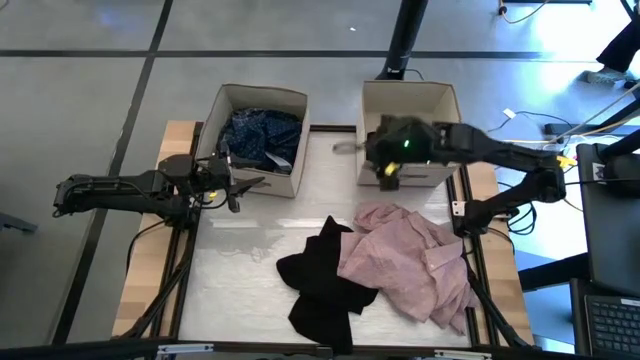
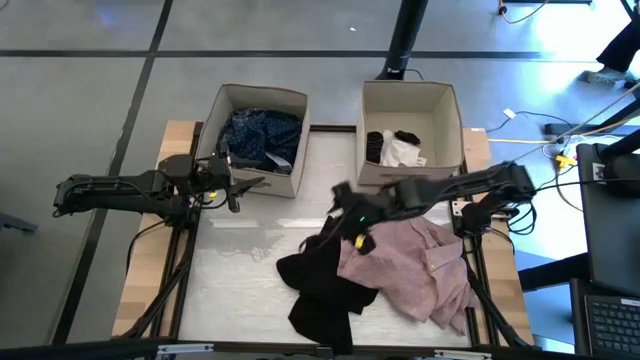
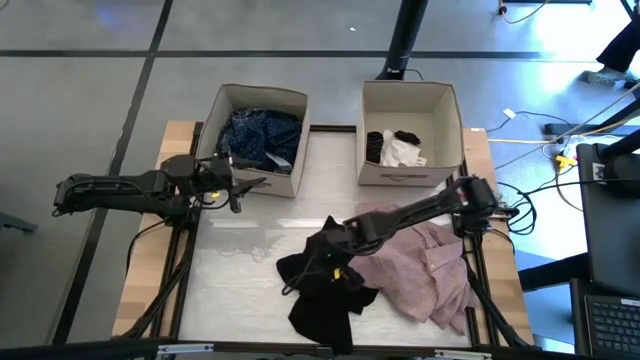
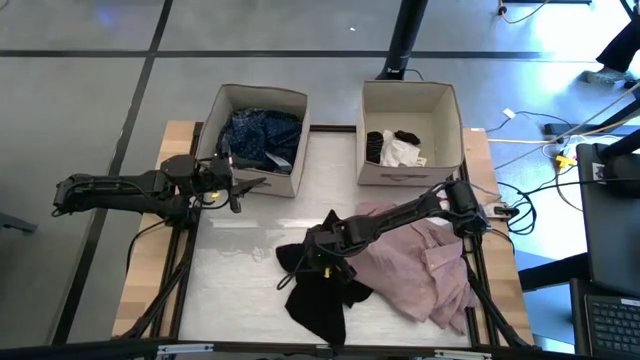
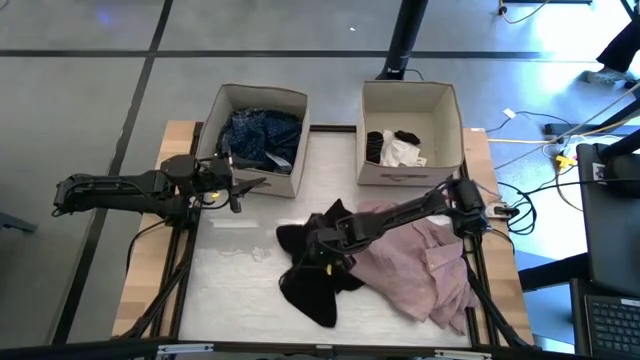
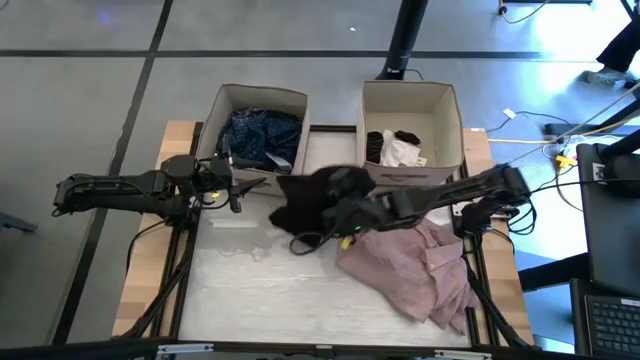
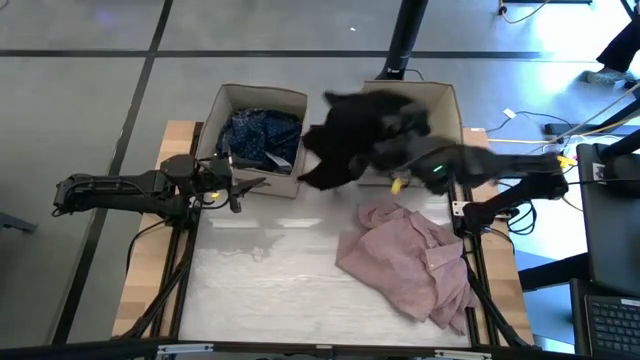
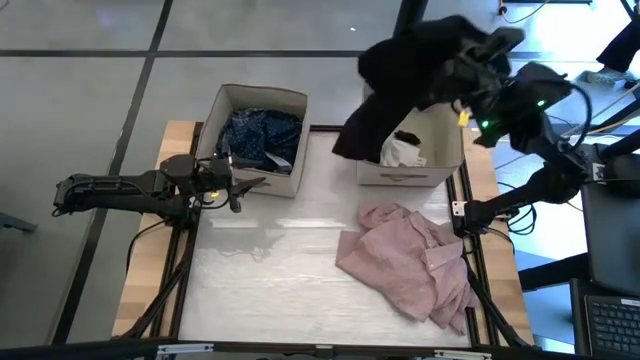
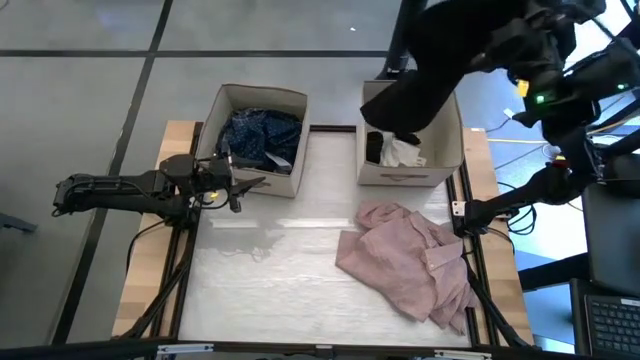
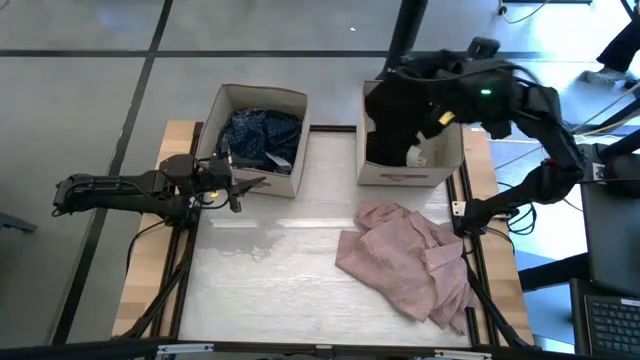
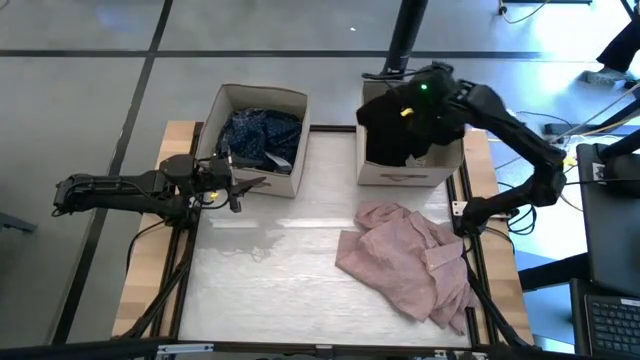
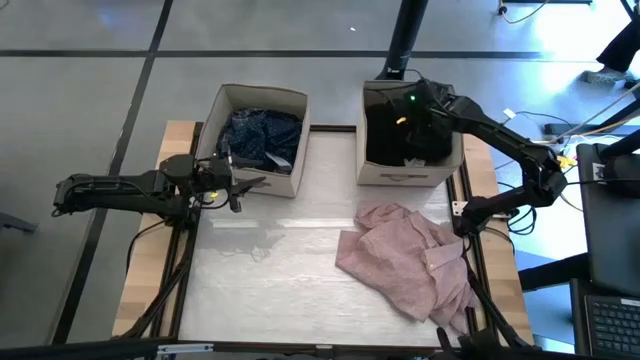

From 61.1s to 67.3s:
Task: Sort clothes
Put the black shirt into the right laundry organizer

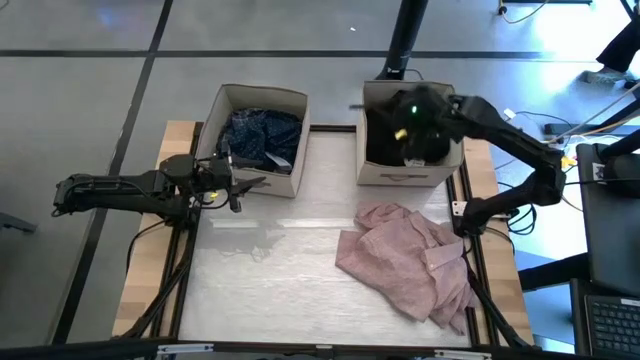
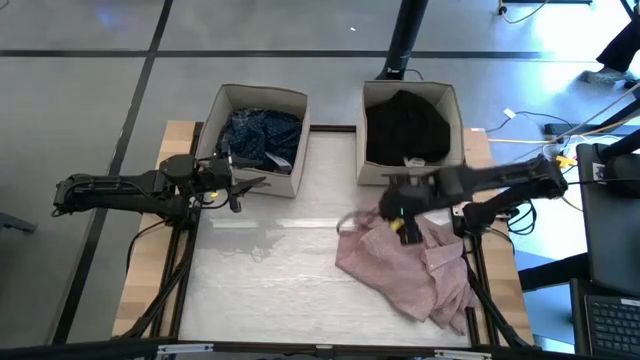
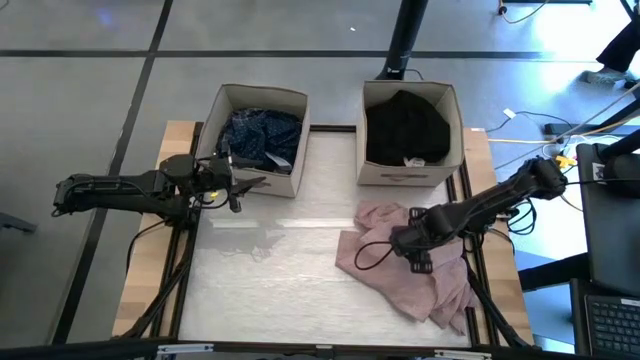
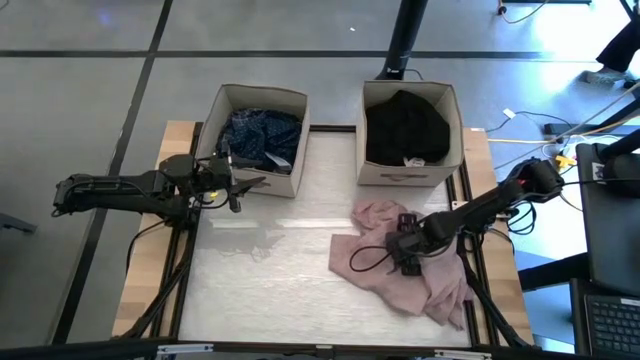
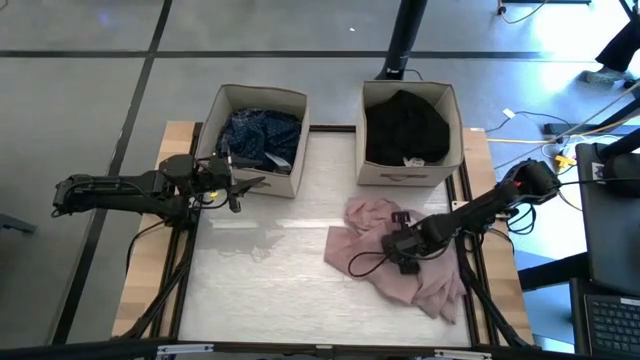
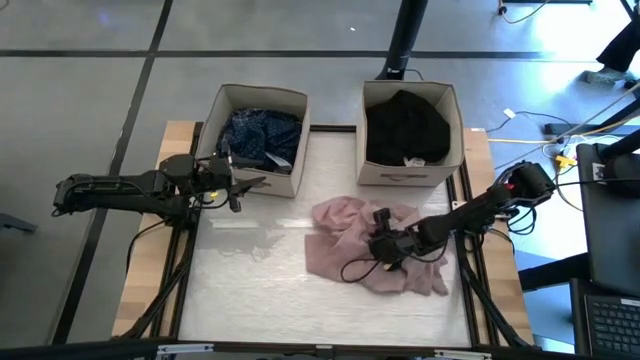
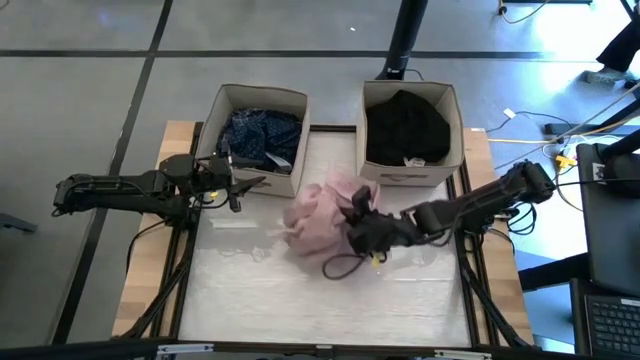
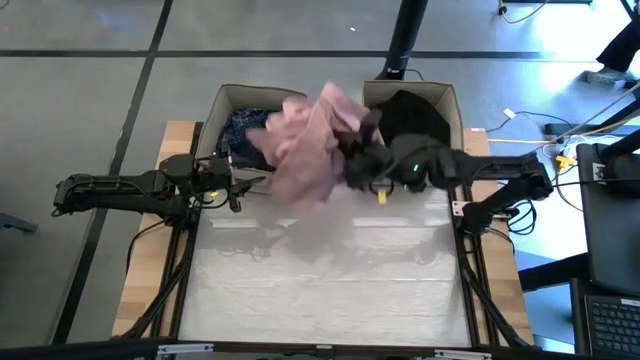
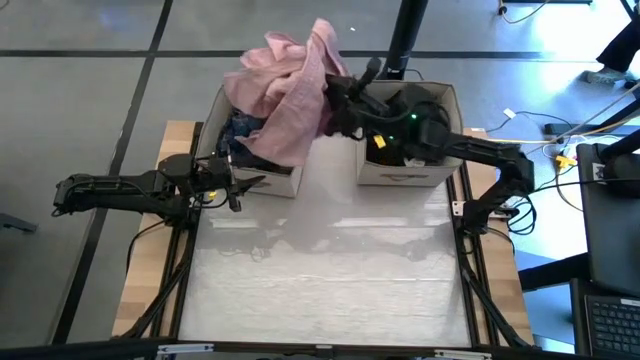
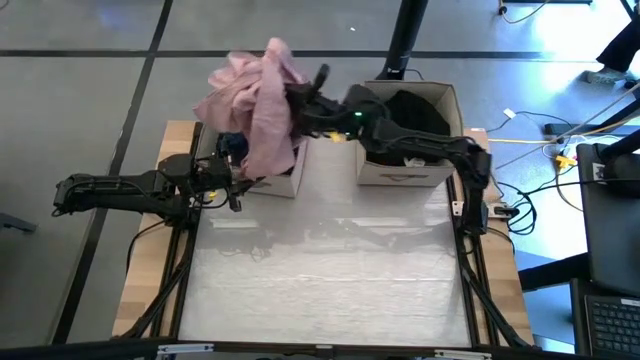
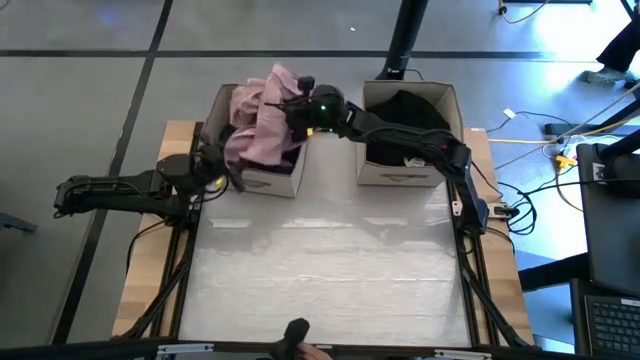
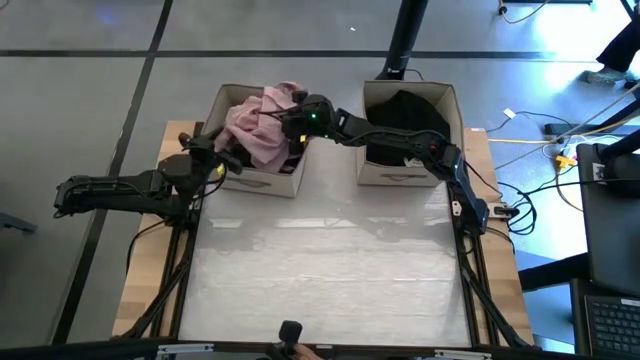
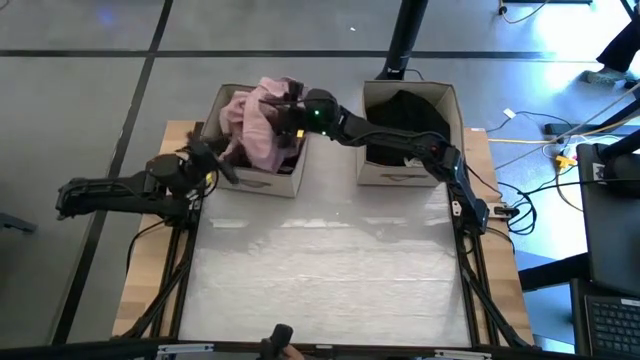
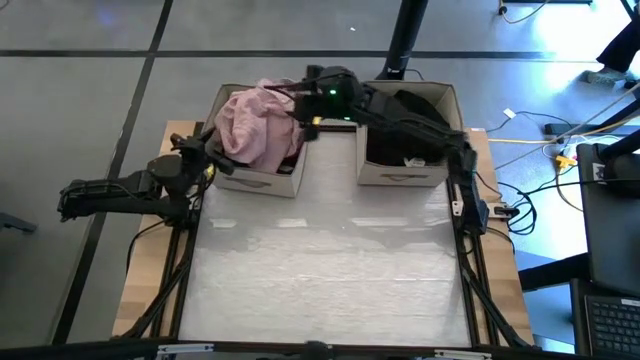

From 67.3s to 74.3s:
Put the pink shirt into the left laundry organizer

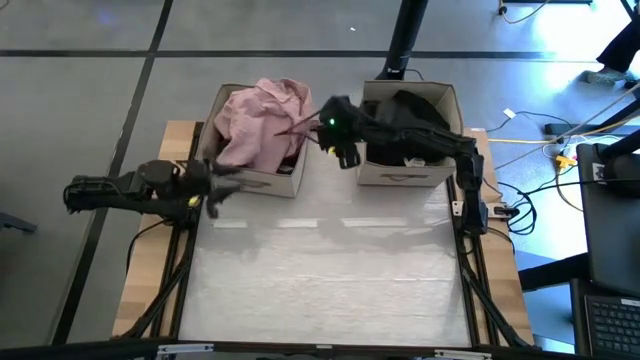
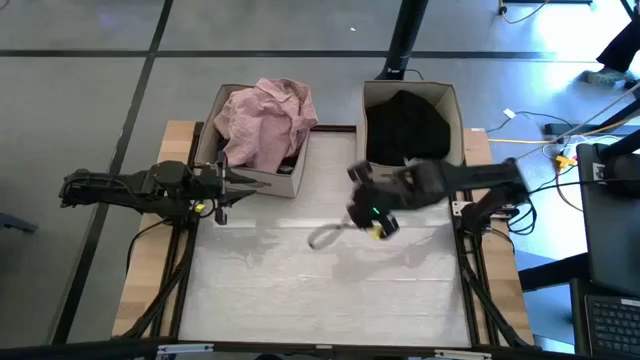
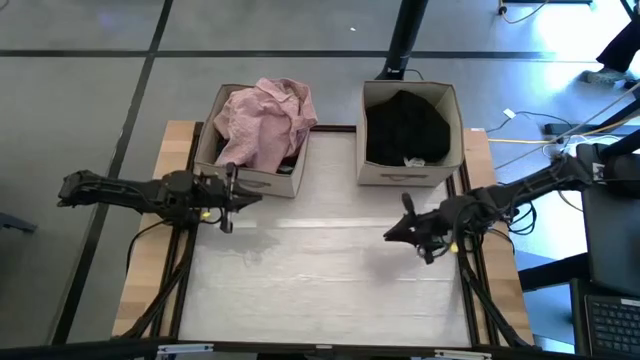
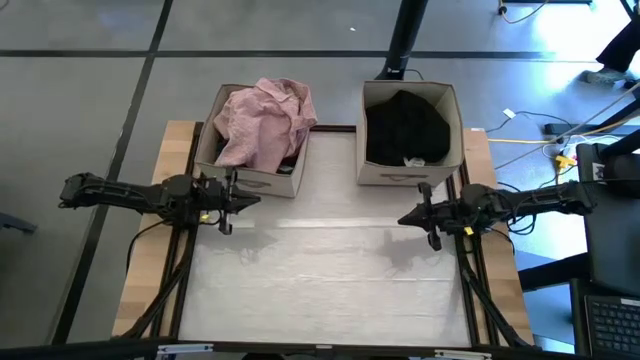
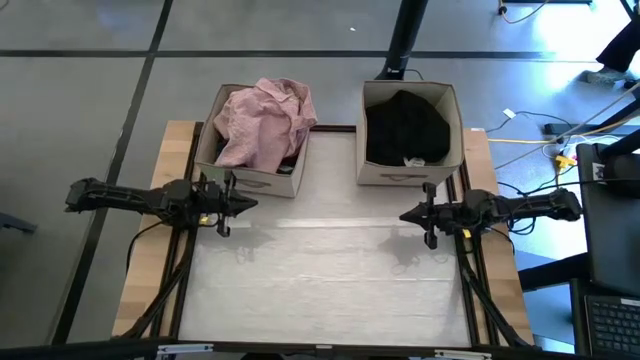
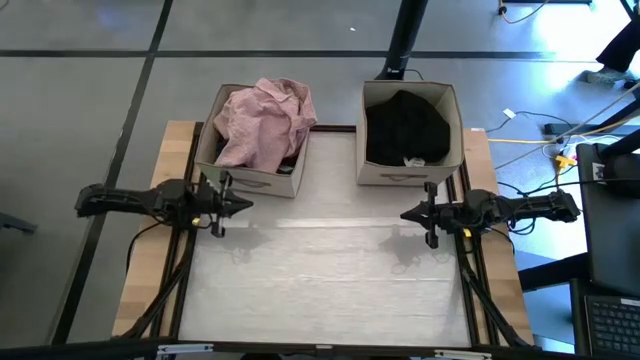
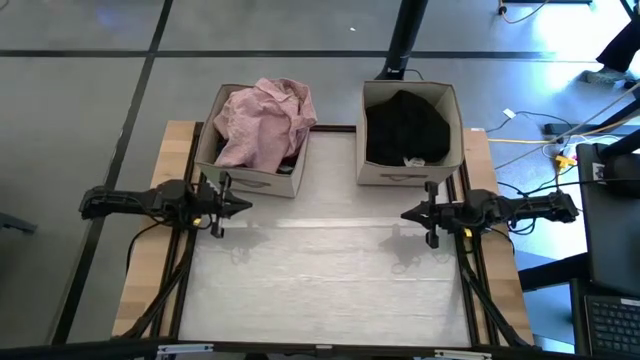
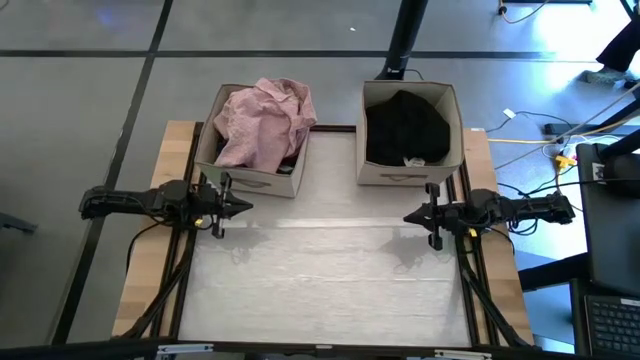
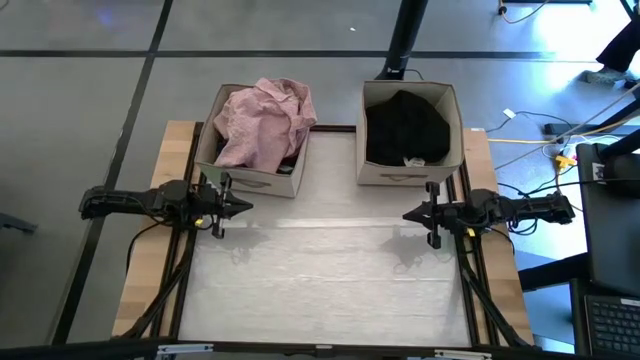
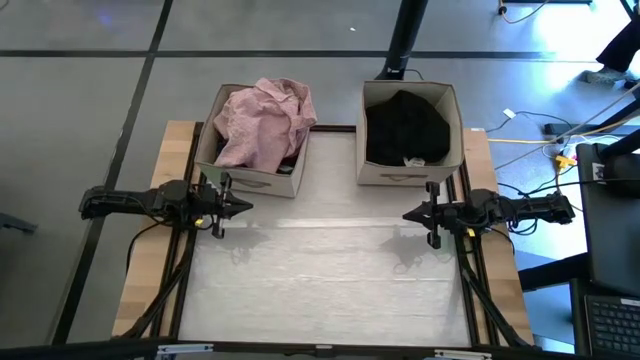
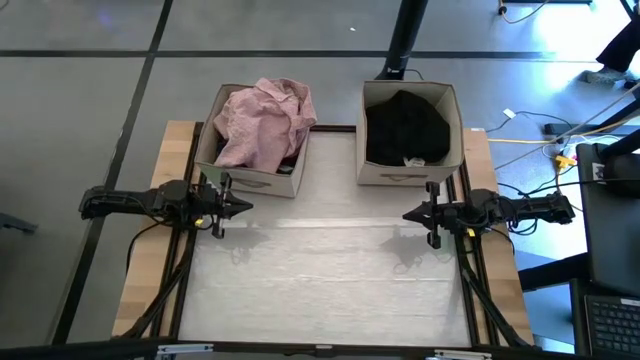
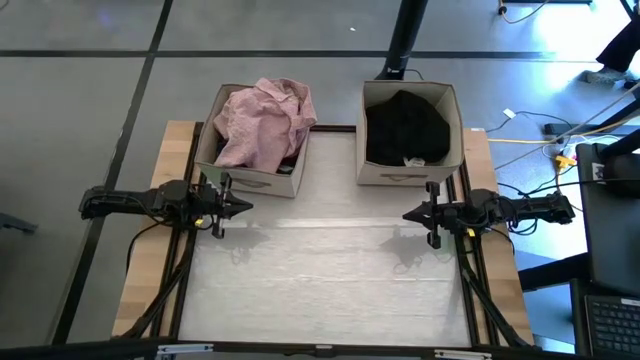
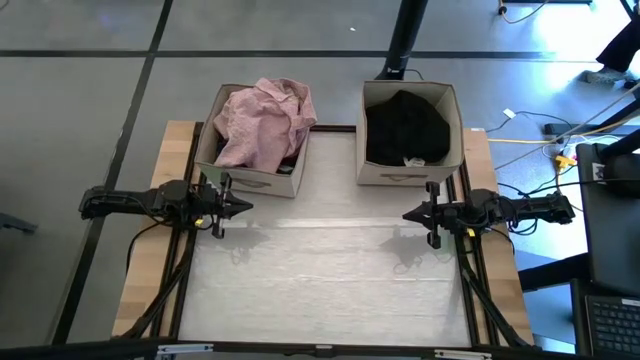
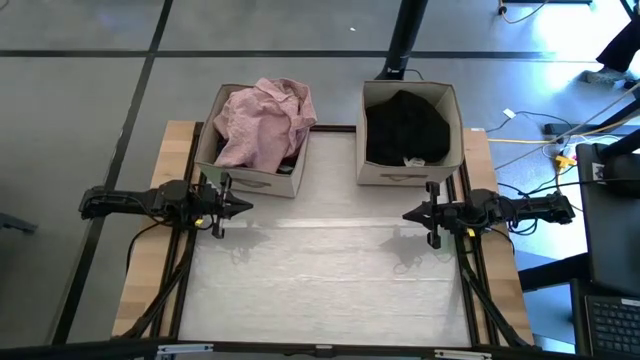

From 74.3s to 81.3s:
Return to Home Position

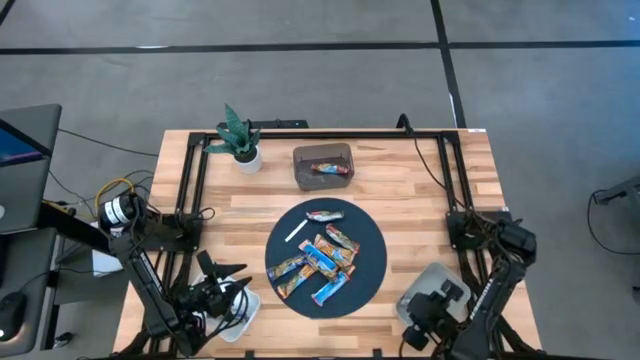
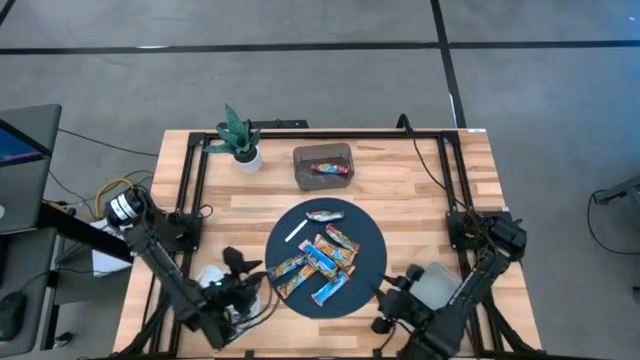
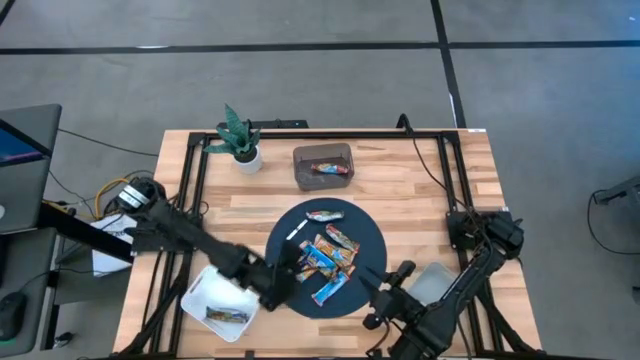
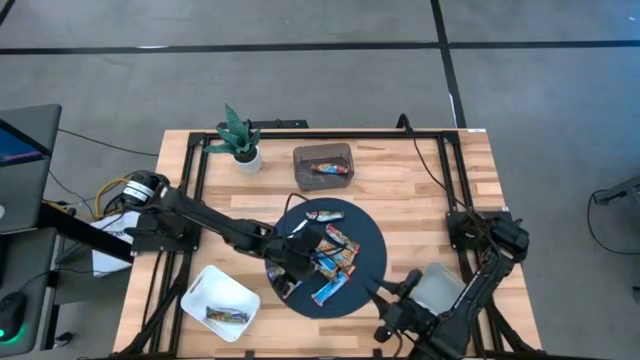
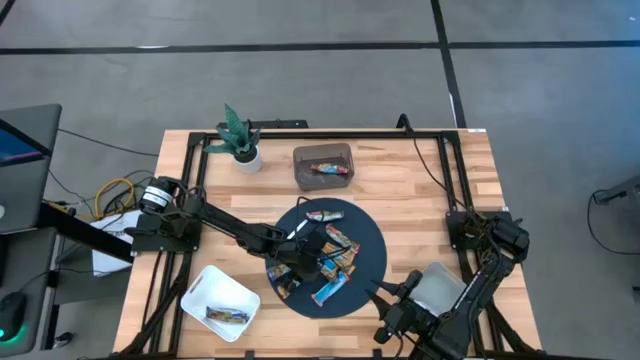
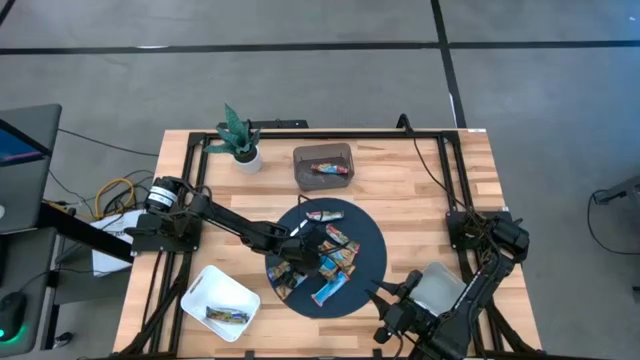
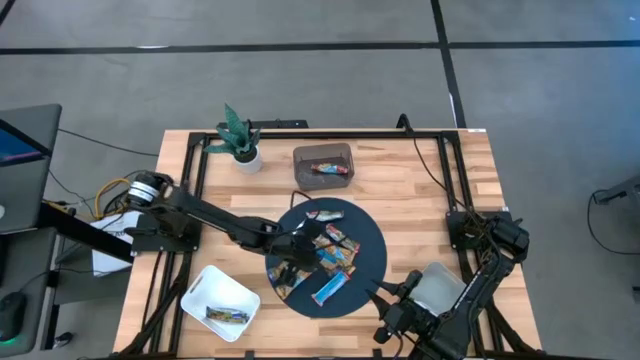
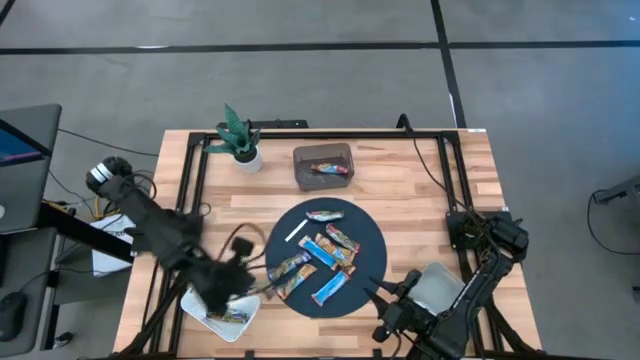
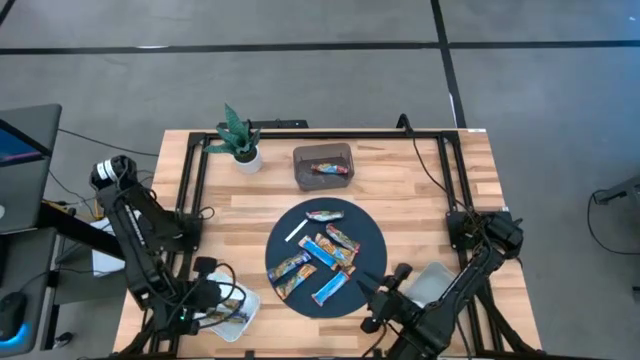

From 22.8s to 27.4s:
Task: Pick and place Granola Bars by type
Put the blue granola bar into the white bin
